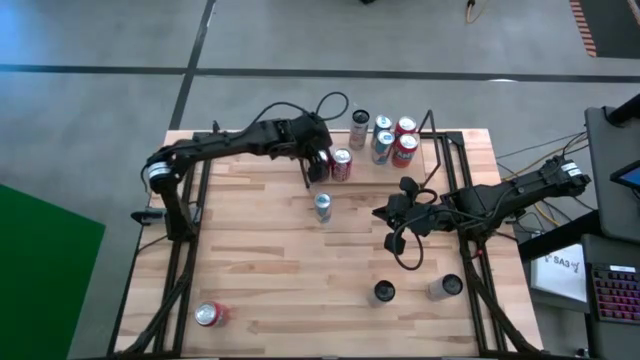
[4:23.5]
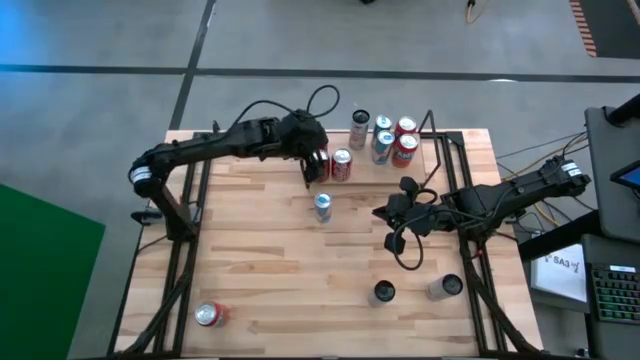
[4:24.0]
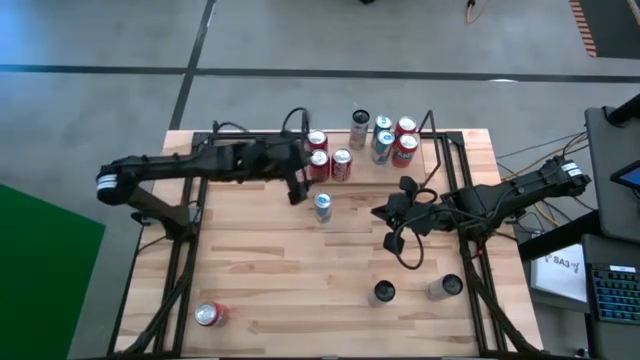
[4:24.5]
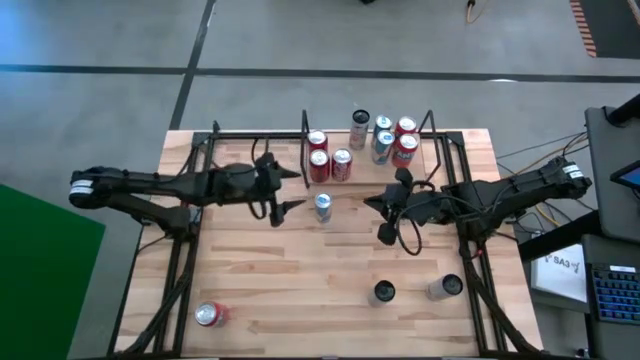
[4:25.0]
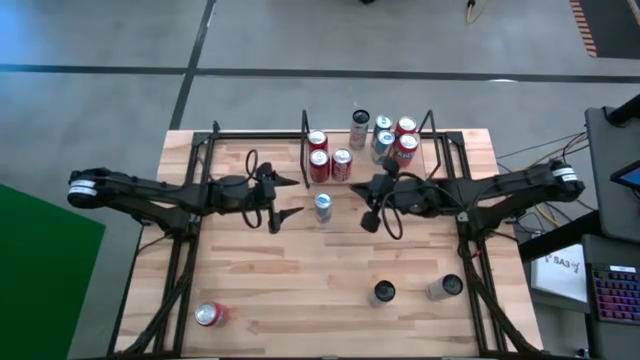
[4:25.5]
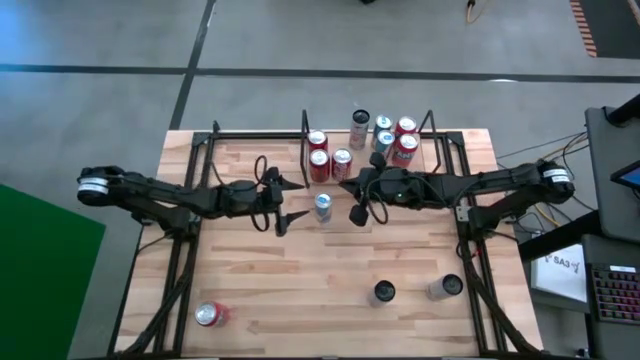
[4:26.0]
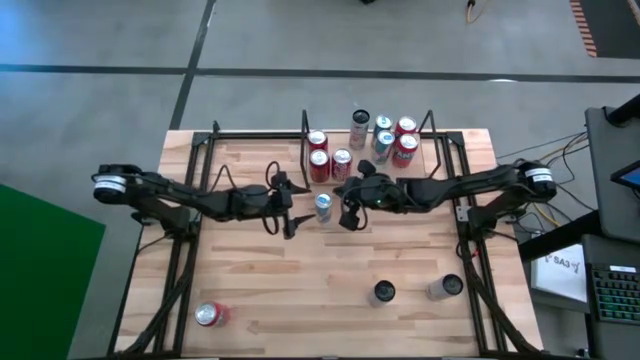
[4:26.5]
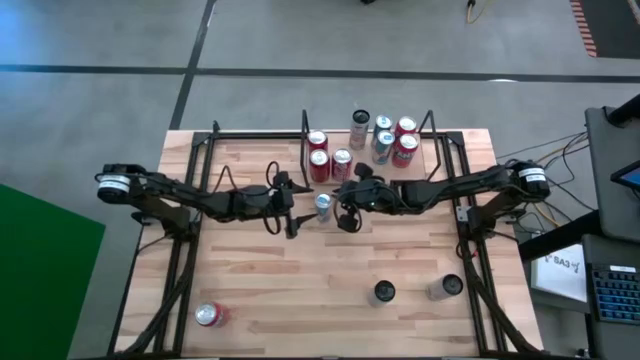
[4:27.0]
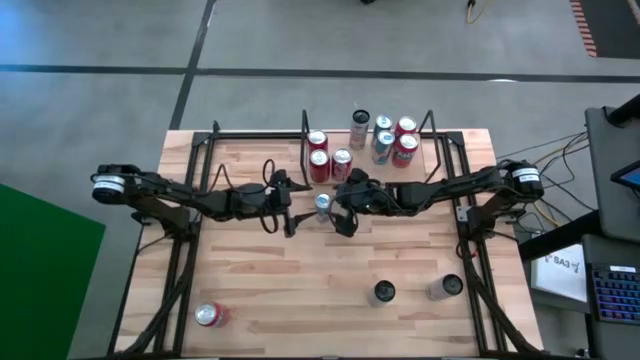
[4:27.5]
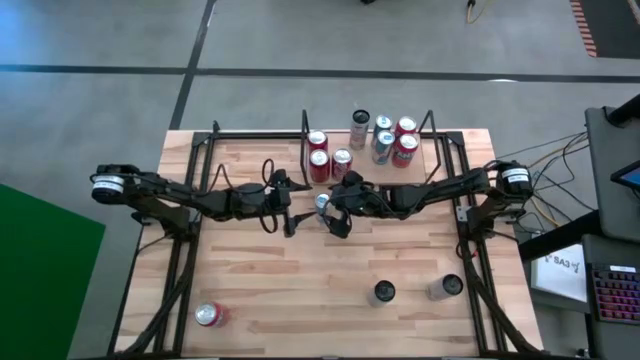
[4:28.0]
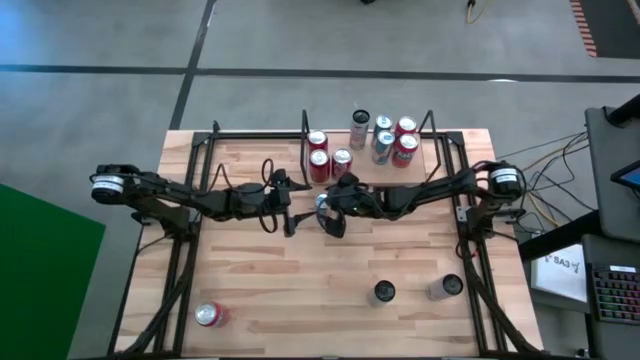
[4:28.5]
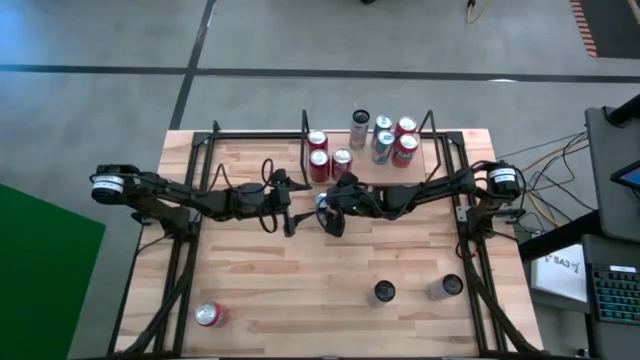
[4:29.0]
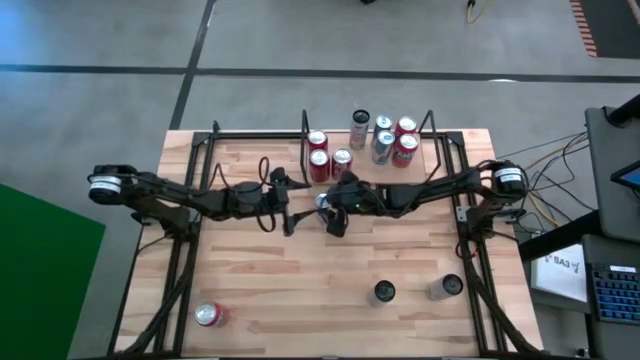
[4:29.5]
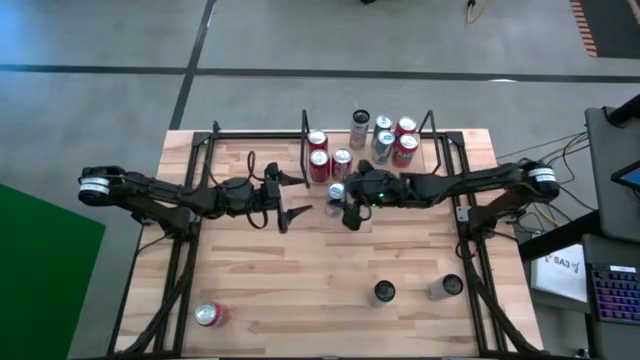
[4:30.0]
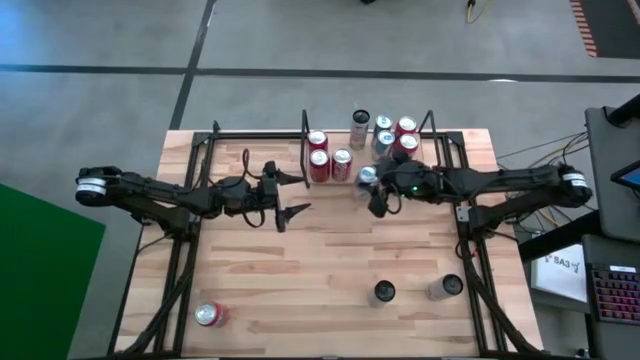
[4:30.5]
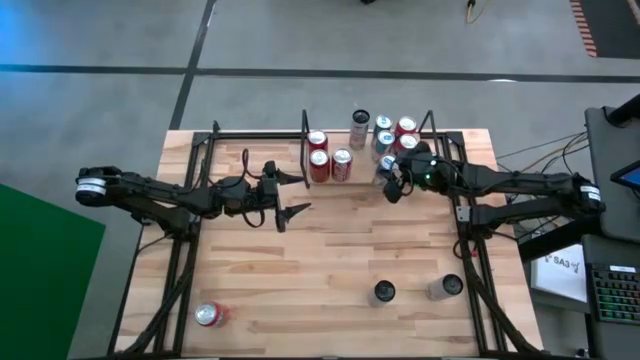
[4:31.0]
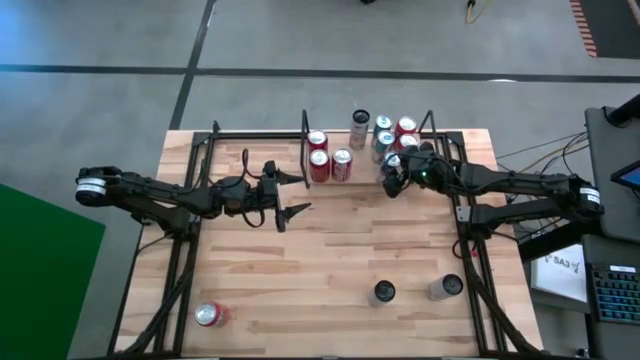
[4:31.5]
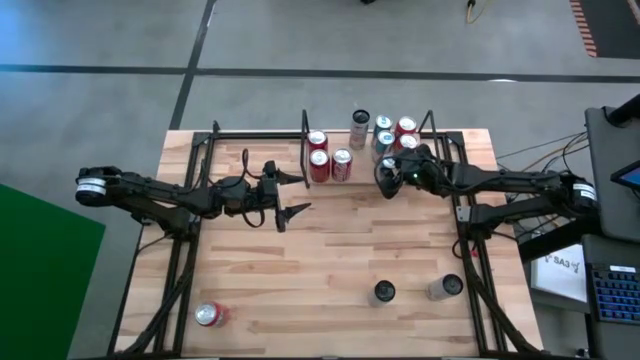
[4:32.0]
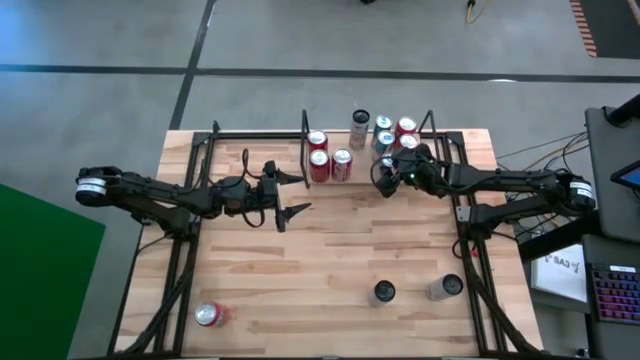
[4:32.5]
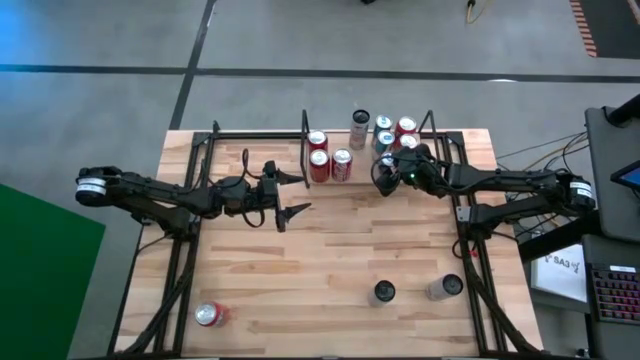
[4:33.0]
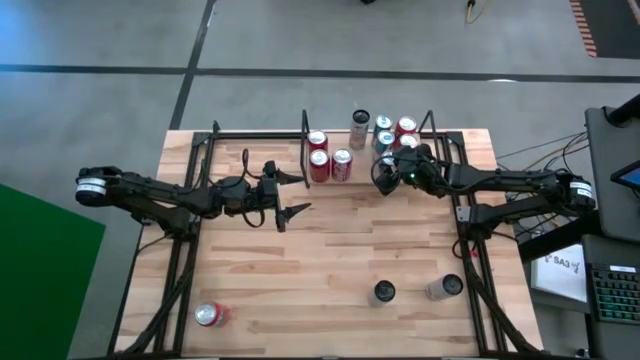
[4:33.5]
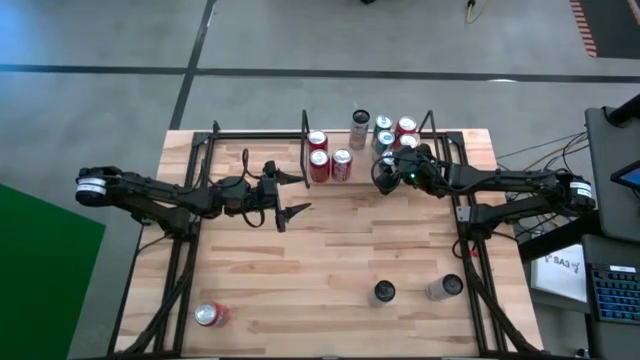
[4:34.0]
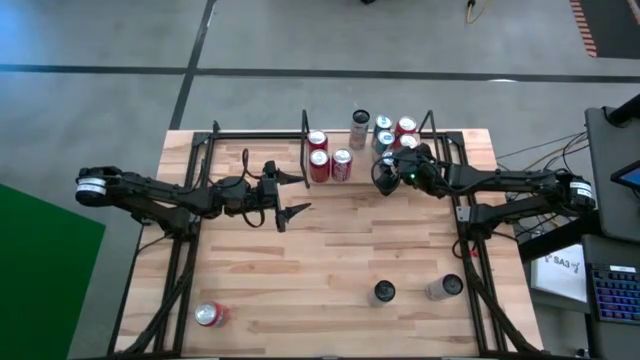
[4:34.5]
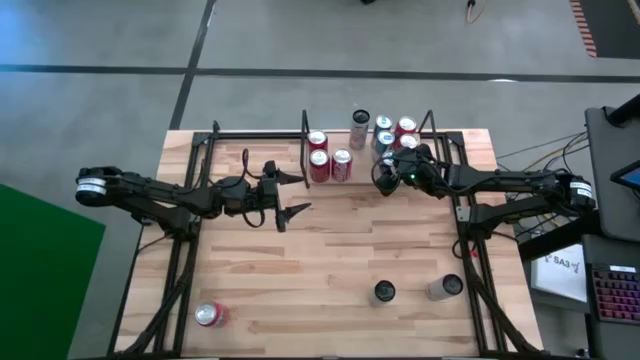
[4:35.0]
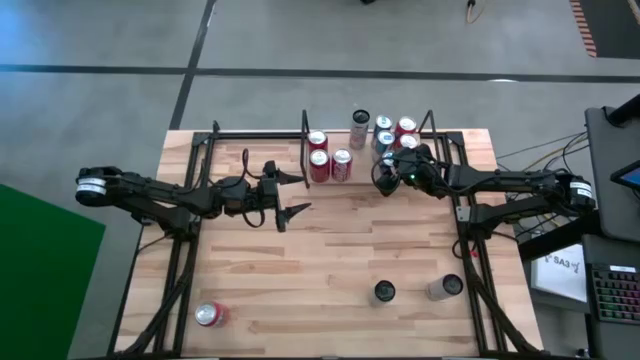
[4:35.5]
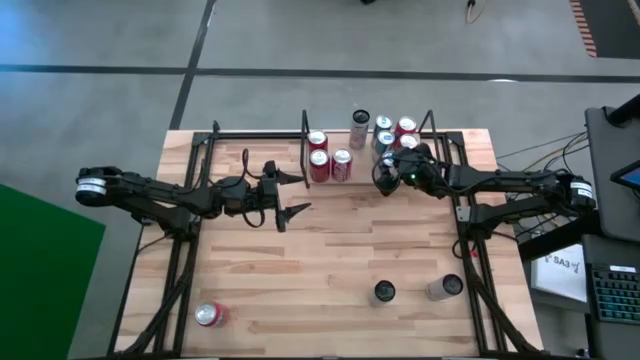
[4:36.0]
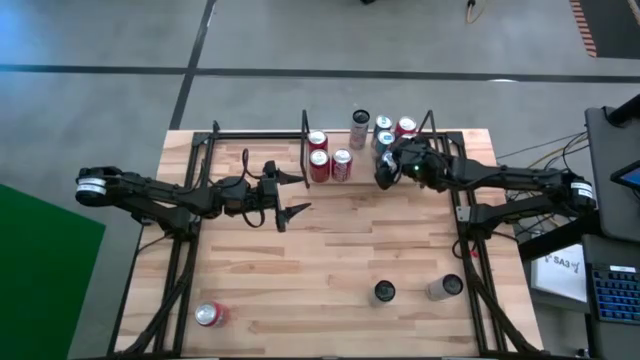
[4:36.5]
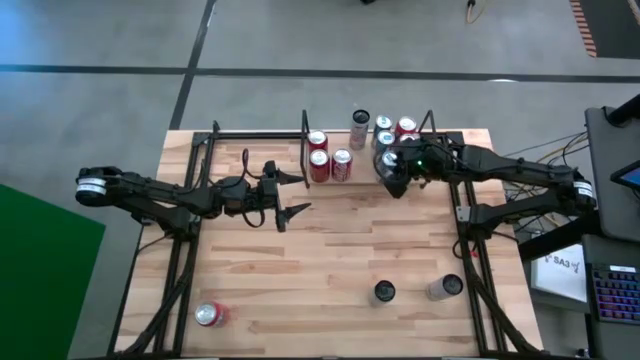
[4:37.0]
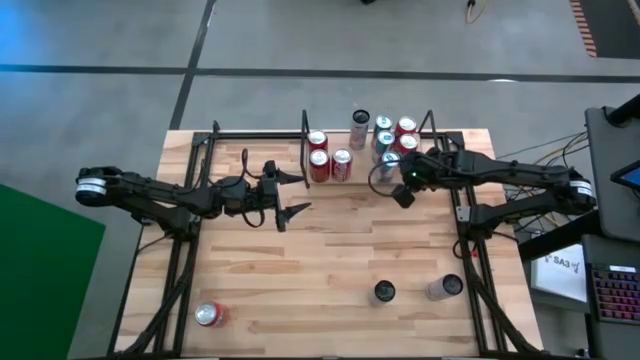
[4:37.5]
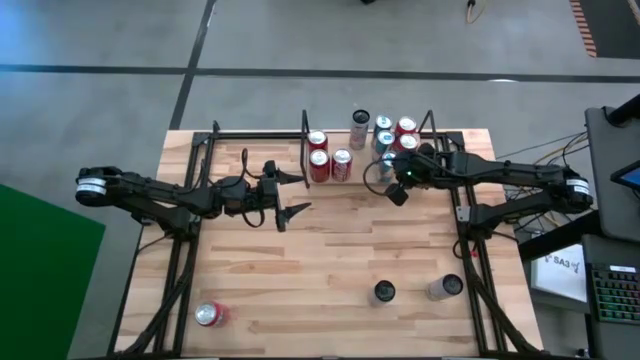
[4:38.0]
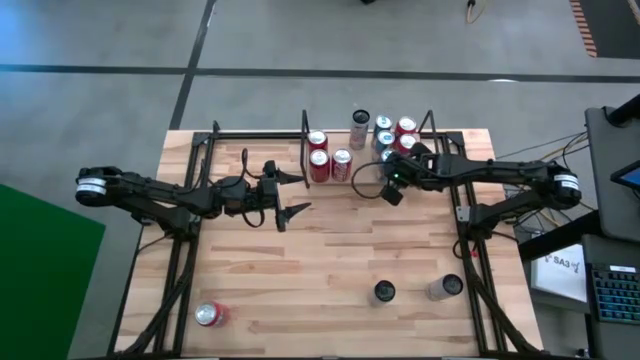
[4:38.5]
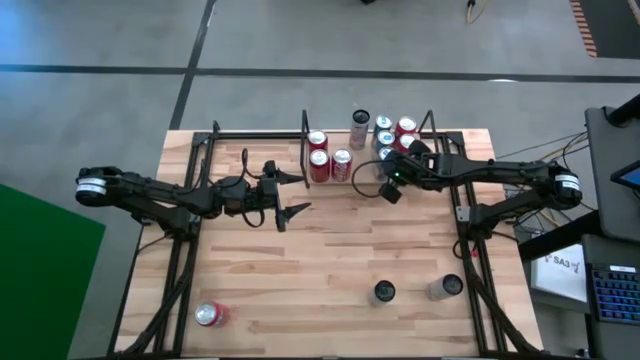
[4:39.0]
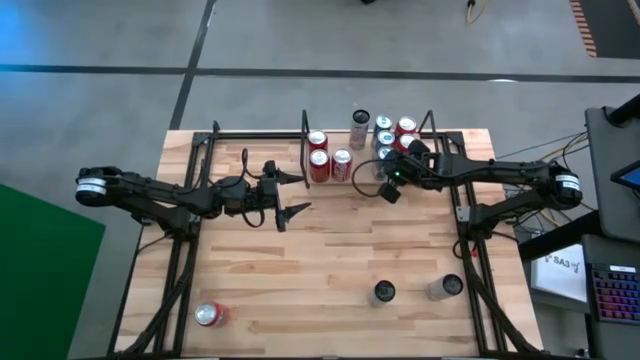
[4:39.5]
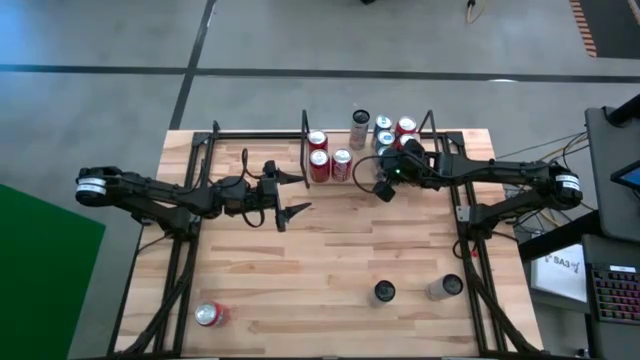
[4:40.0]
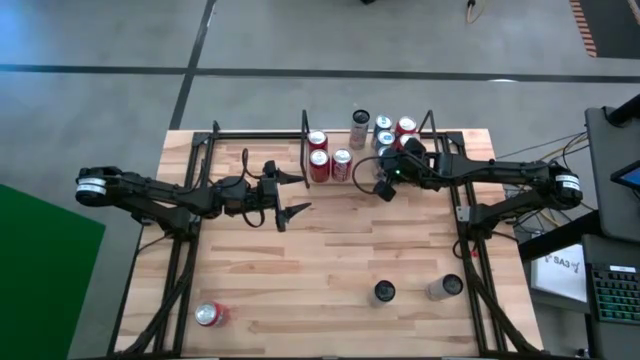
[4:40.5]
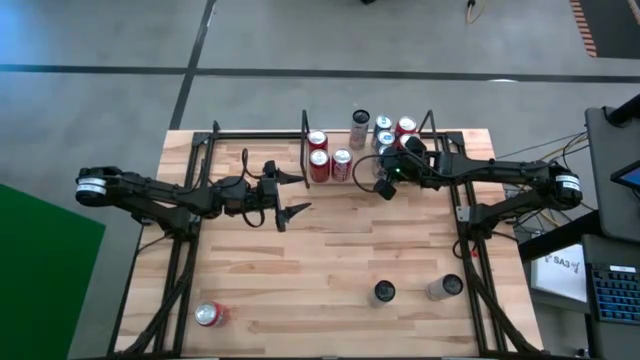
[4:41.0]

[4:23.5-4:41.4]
Task: Place canned beverage on shelf
Put the white and blue soda can on the shelf

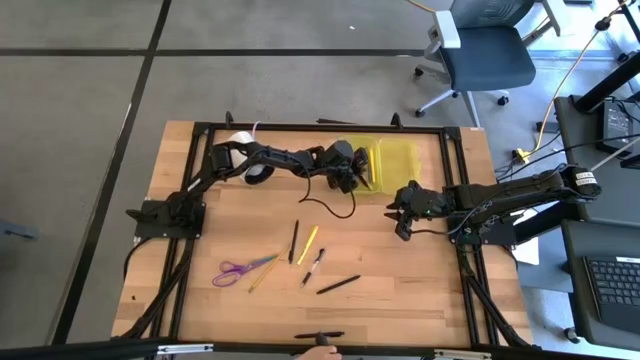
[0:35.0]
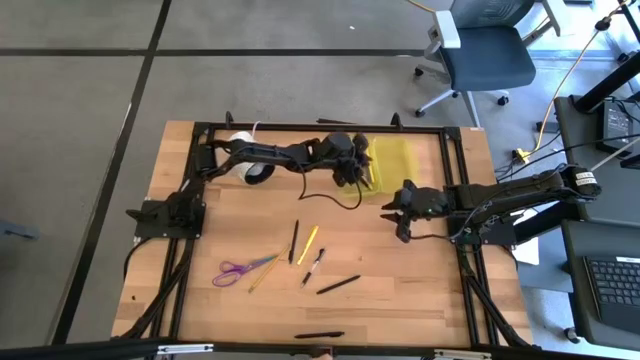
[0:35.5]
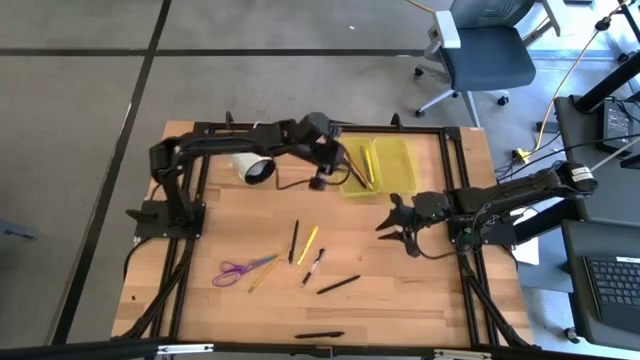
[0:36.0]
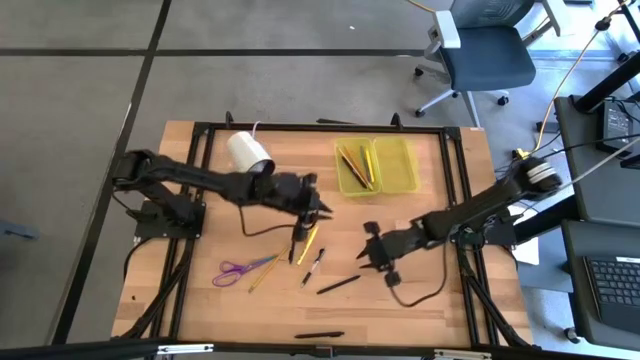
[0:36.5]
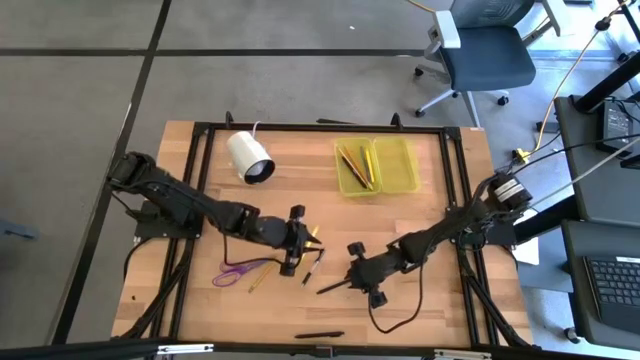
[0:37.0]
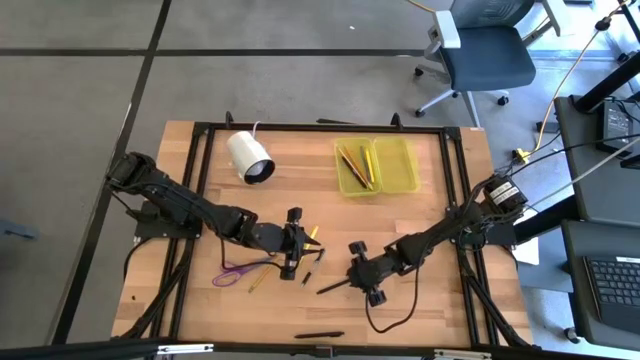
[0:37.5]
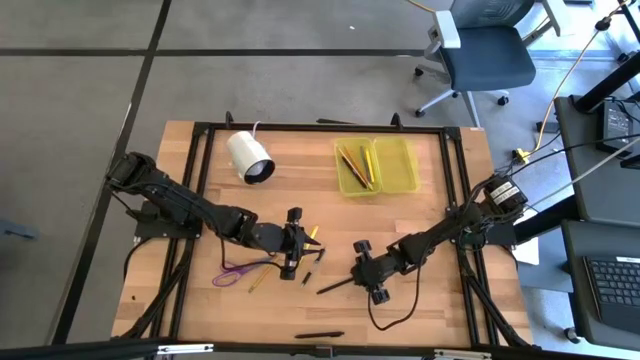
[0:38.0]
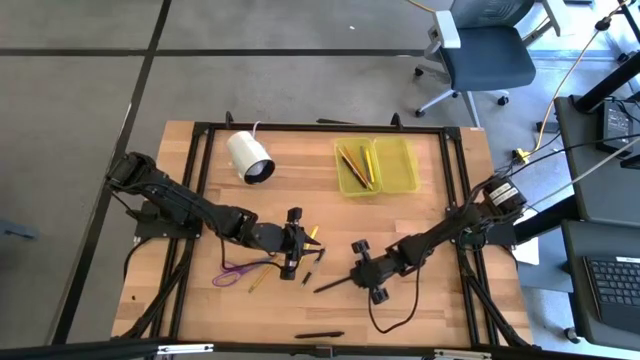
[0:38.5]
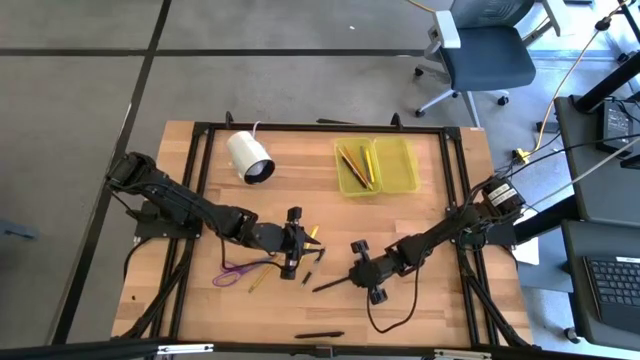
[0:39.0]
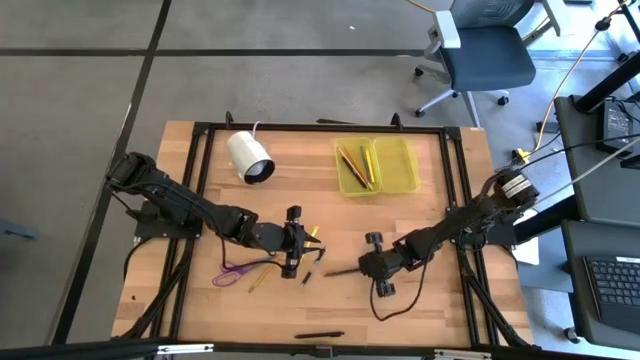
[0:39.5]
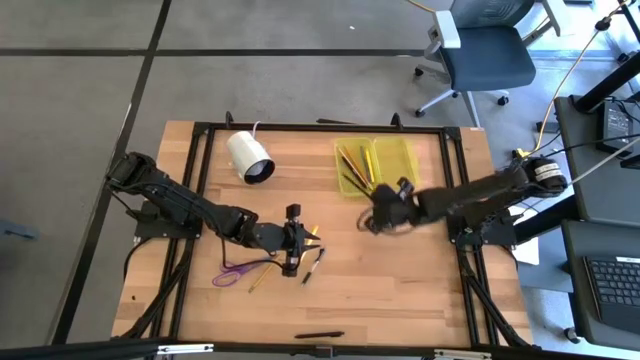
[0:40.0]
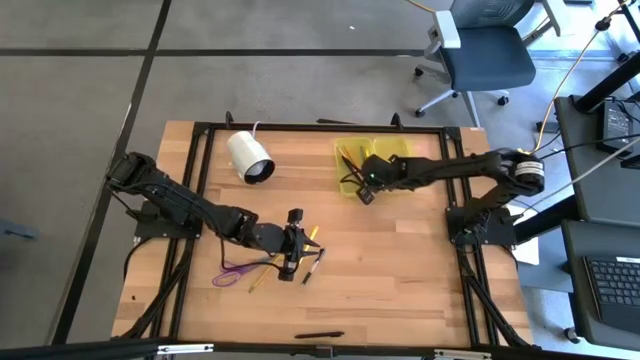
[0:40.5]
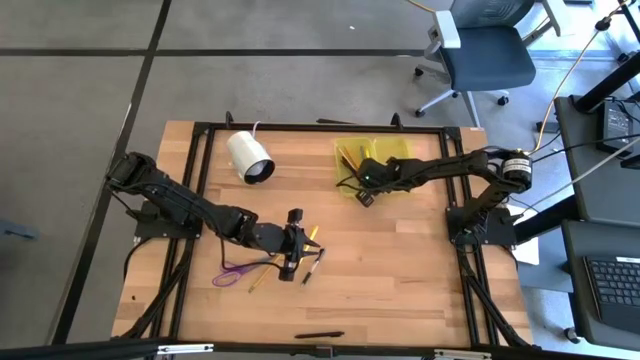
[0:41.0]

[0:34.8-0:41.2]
Task: Pick & place school supplies into a supply box
Put the black pen into the yellow supply box
